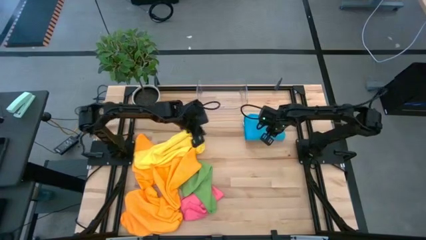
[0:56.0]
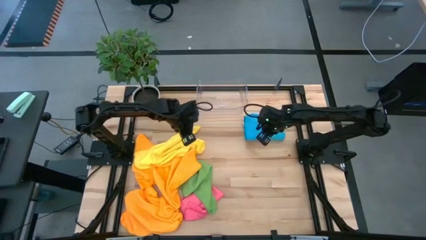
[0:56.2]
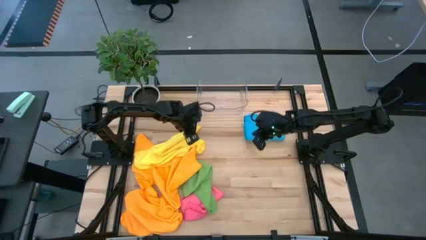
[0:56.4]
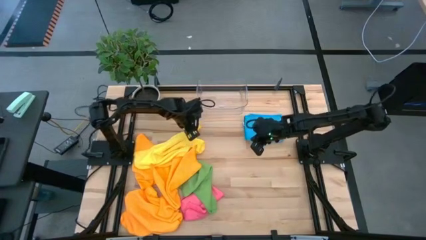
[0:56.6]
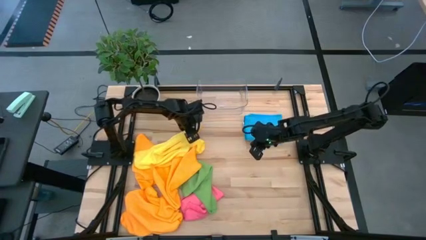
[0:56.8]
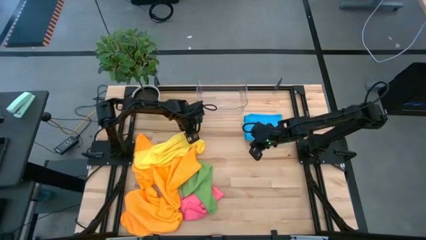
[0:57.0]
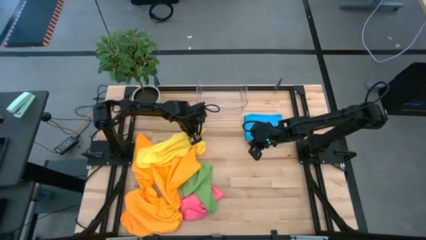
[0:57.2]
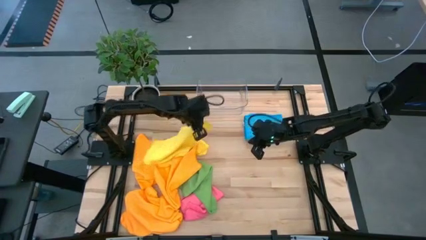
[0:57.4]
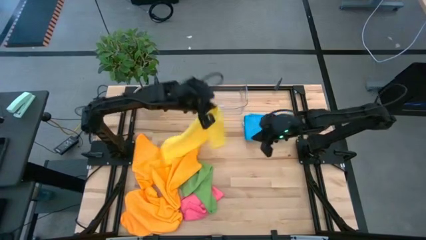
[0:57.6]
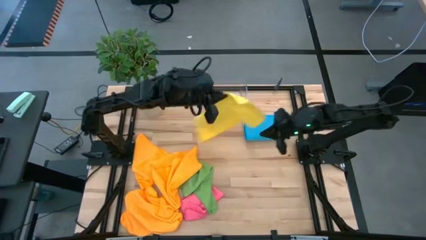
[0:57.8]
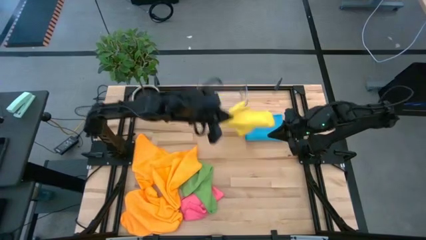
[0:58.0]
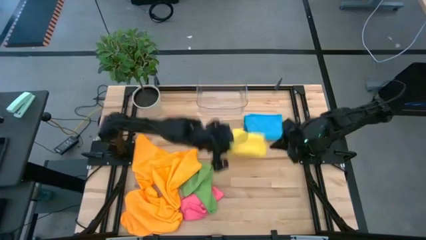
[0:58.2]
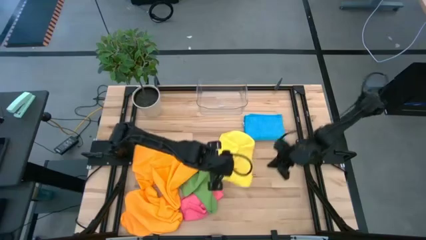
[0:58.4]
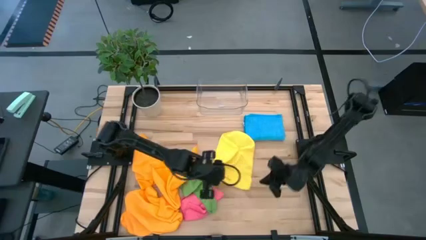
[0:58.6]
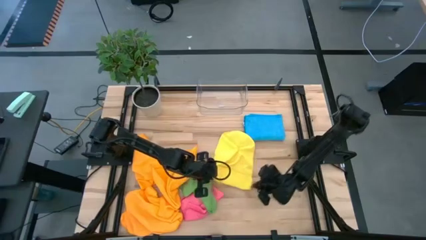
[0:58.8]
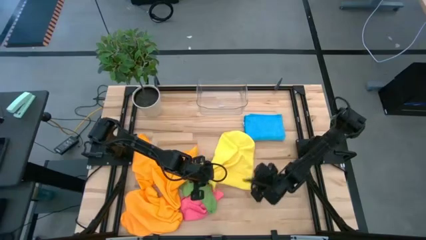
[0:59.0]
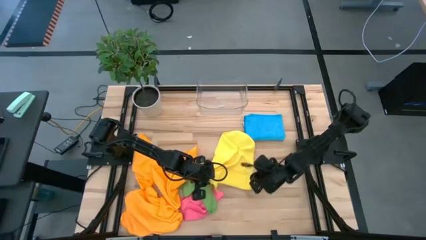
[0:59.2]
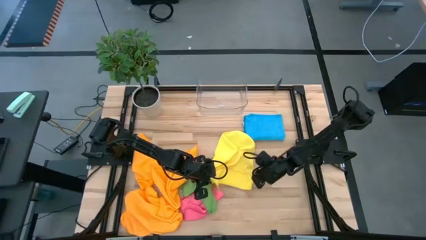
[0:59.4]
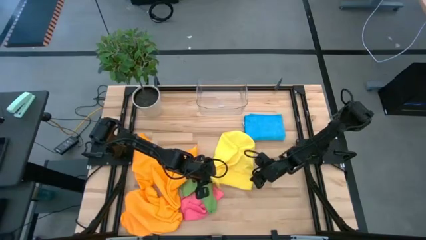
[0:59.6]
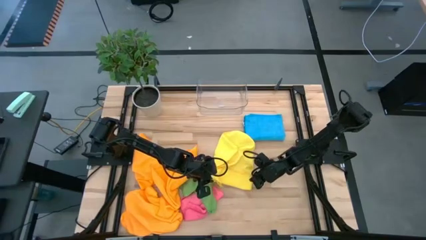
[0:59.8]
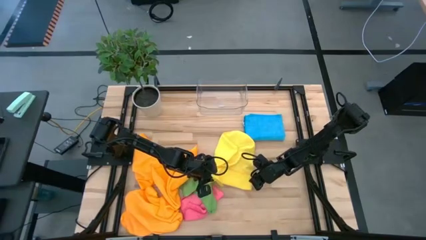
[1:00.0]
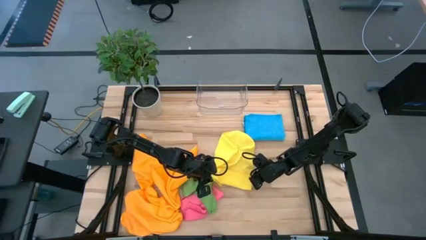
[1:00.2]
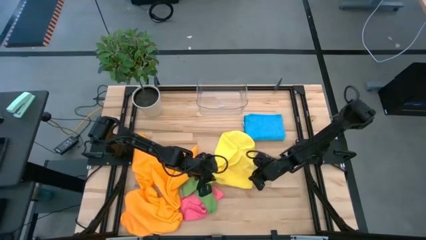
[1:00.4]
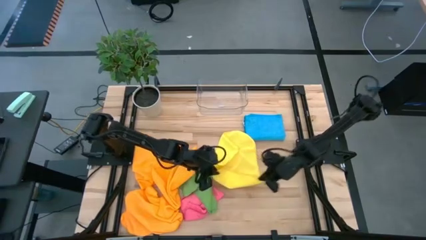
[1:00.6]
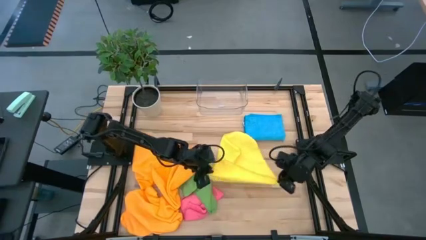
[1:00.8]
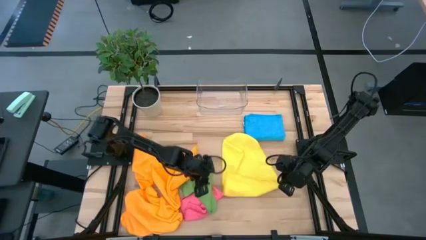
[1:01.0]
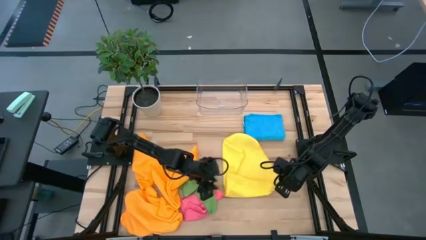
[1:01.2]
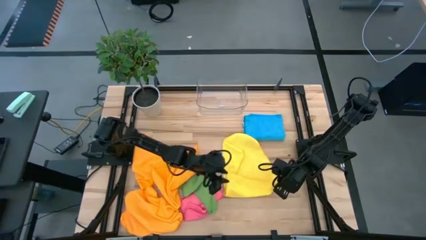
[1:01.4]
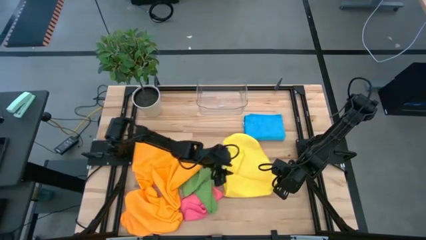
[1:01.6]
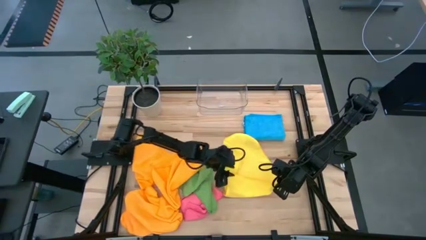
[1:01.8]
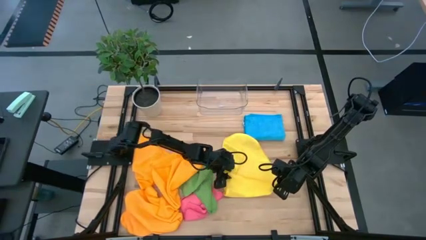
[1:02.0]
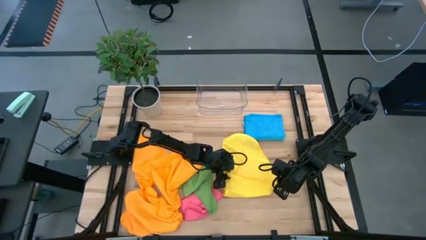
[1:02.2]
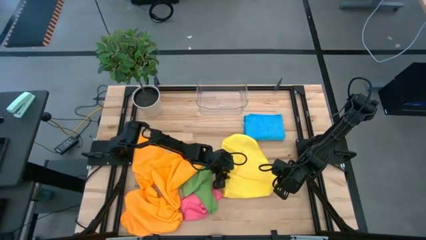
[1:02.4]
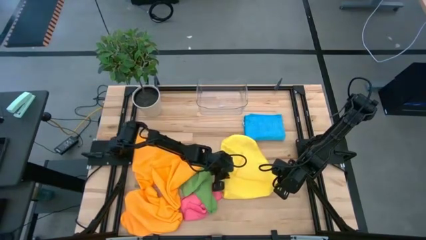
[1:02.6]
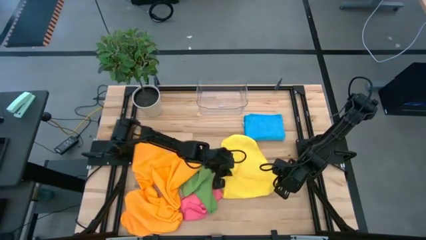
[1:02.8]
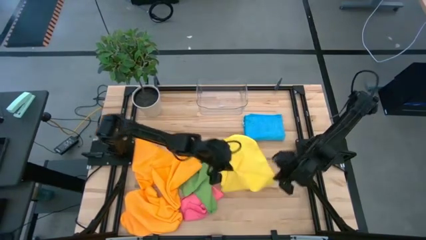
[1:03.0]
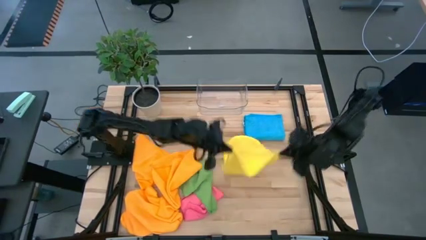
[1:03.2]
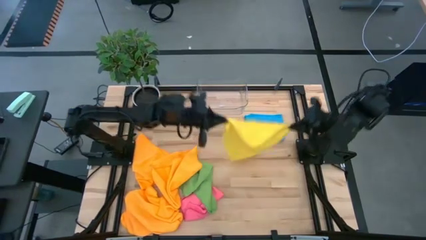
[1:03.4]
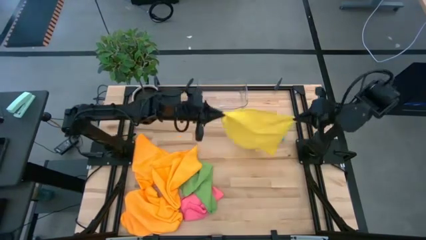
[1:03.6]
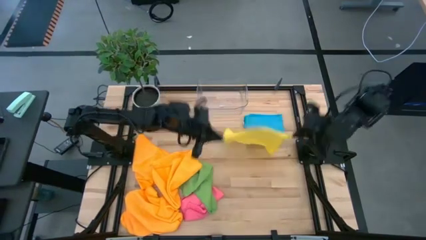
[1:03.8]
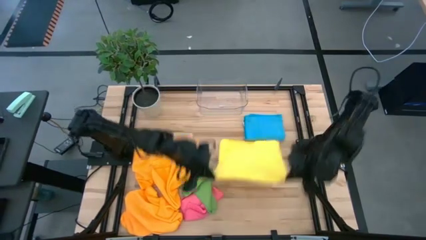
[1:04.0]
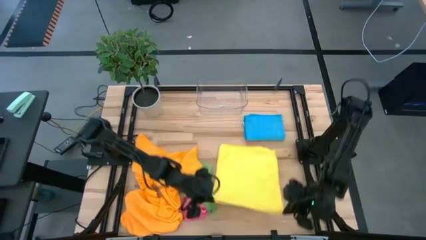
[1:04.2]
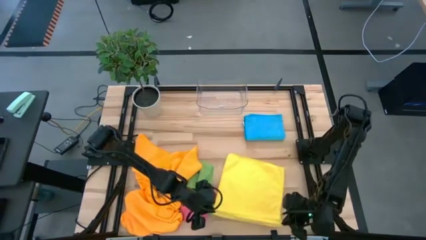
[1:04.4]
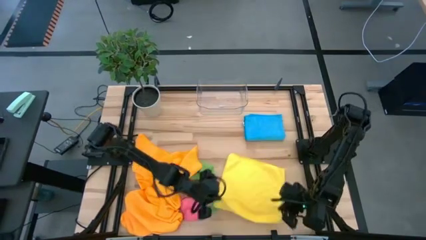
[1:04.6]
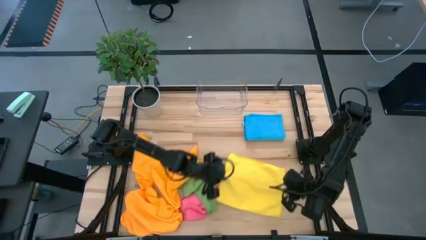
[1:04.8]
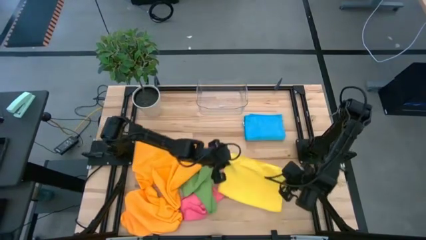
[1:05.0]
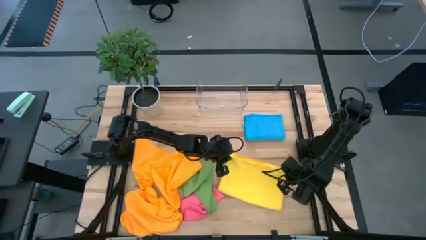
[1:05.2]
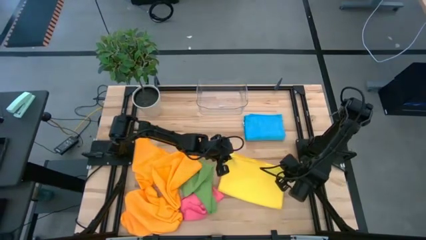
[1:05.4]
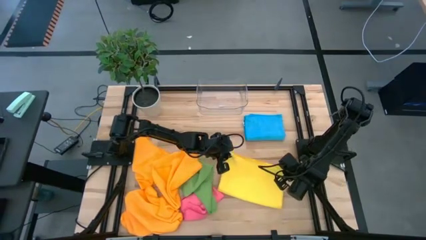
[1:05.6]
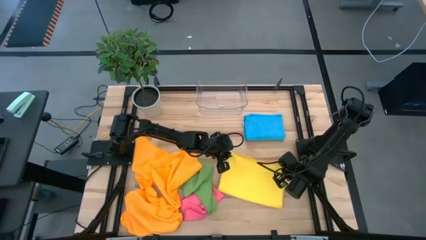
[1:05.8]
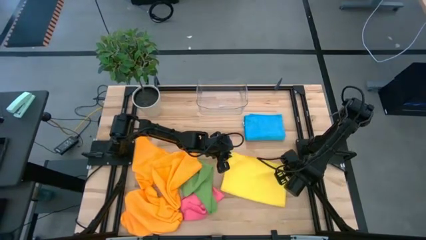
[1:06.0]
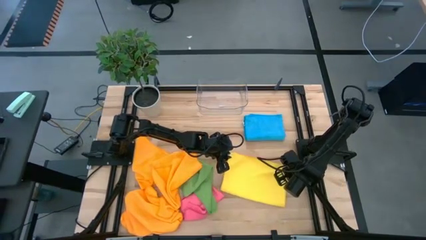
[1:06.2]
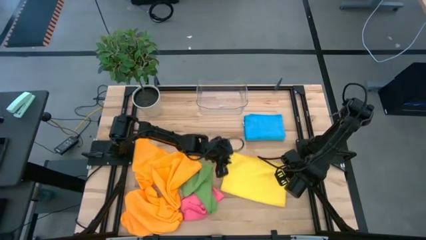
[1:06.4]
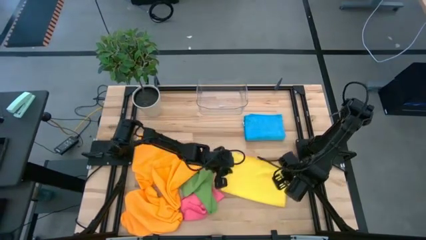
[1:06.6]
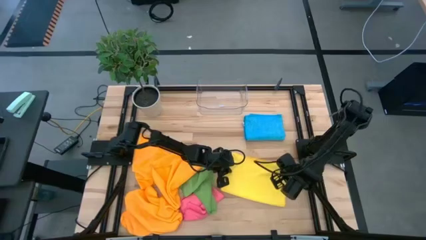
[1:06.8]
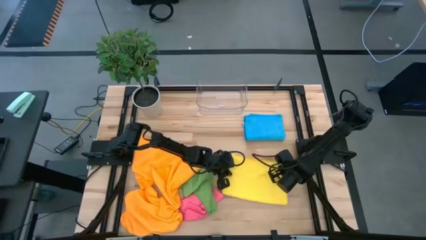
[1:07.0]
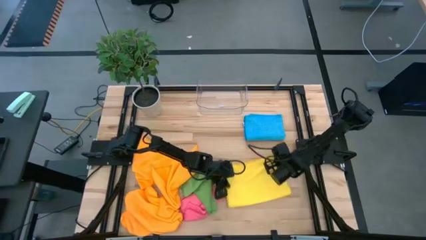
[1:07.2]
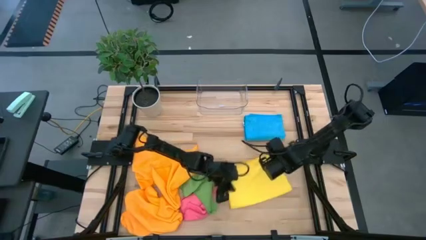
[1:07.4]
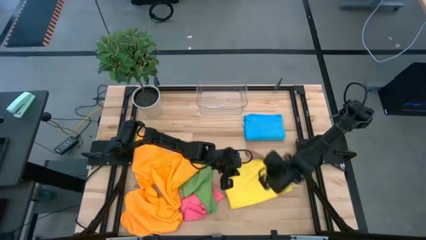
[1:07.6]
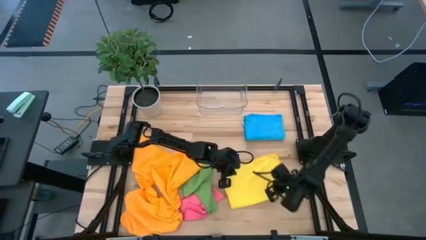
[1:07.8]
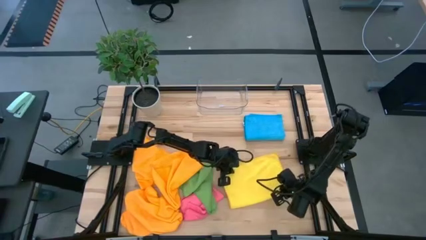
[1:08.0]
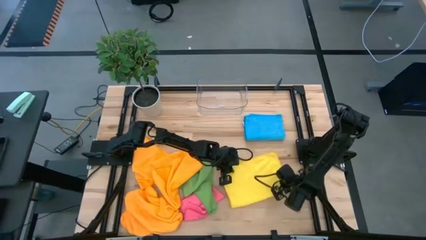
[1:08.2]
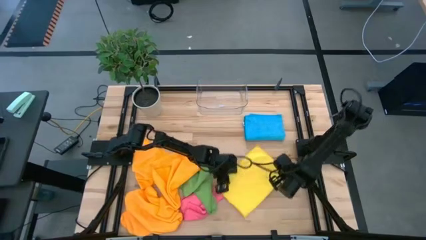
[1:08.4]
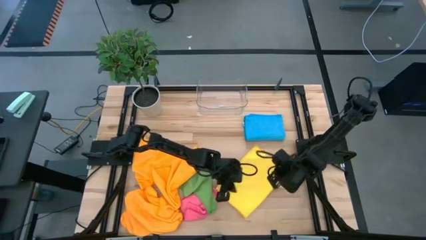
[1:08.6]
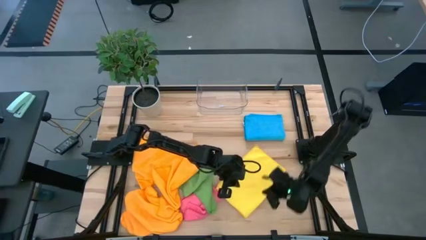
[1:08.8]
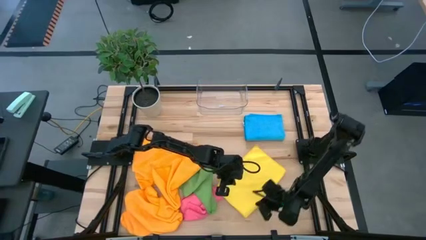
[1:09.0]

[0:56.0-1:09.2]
Task: Fold microfiber towels
Fold the yellow towel

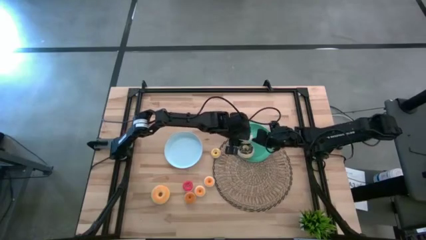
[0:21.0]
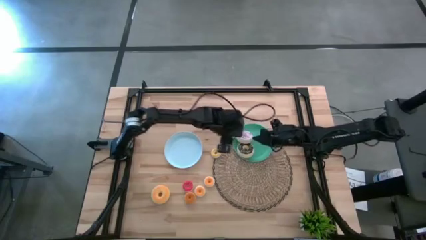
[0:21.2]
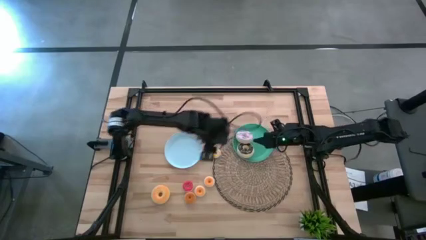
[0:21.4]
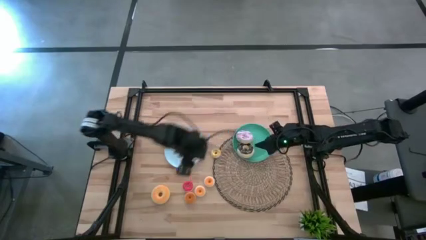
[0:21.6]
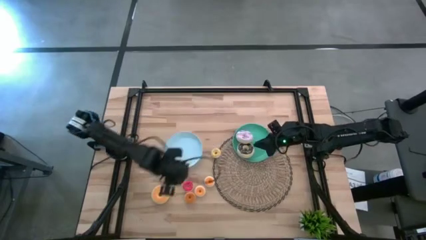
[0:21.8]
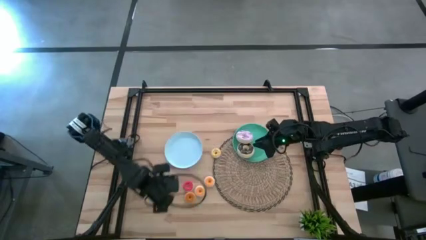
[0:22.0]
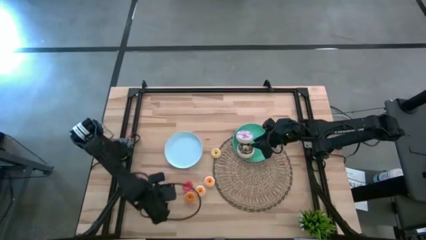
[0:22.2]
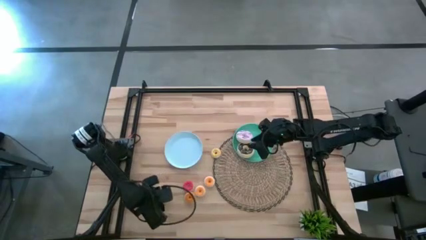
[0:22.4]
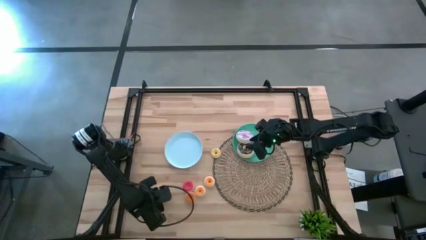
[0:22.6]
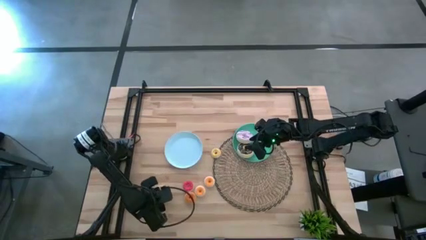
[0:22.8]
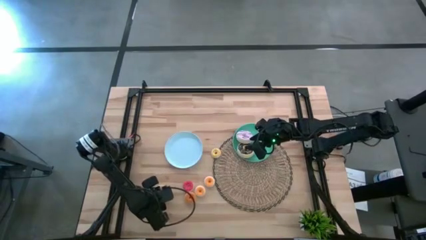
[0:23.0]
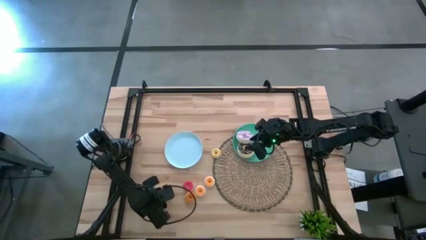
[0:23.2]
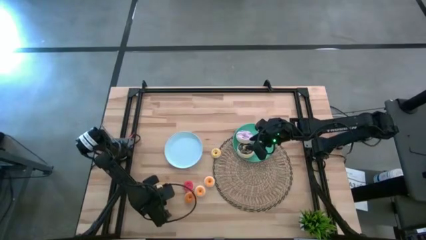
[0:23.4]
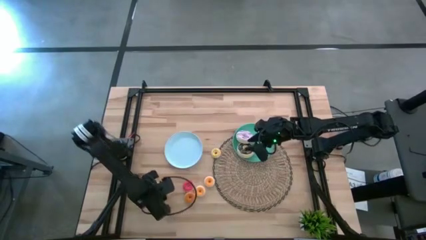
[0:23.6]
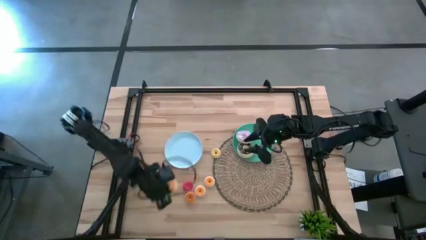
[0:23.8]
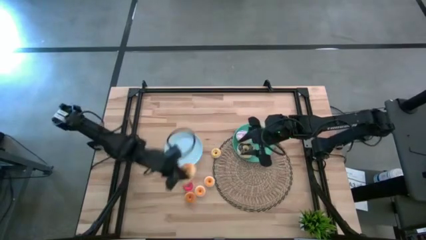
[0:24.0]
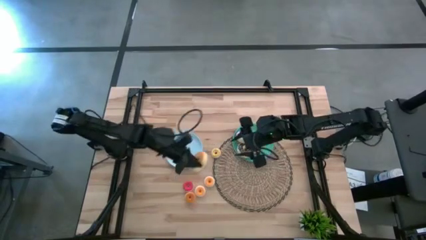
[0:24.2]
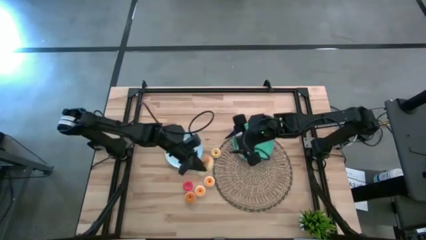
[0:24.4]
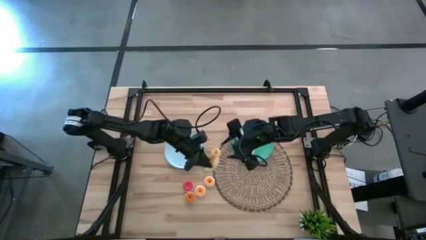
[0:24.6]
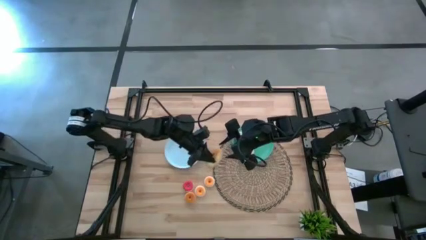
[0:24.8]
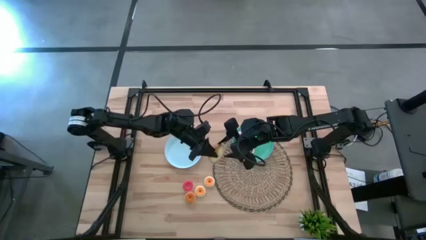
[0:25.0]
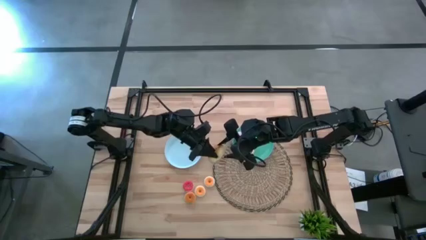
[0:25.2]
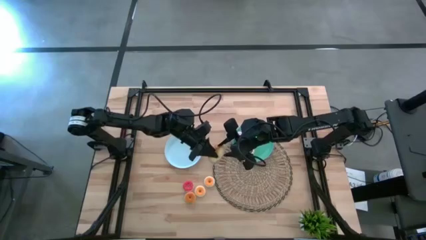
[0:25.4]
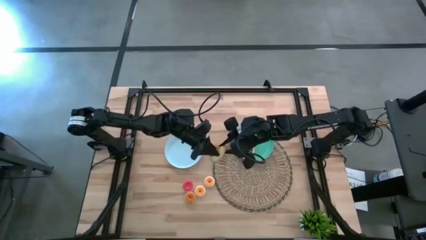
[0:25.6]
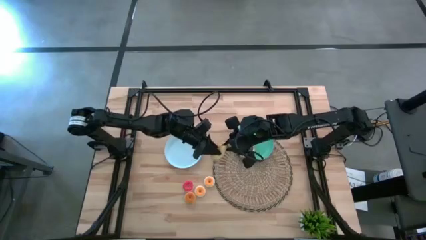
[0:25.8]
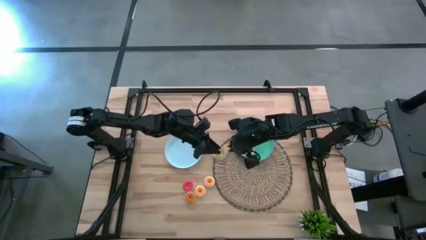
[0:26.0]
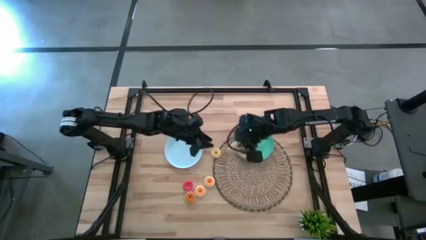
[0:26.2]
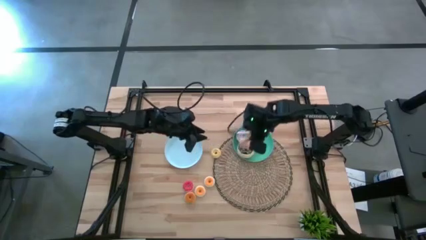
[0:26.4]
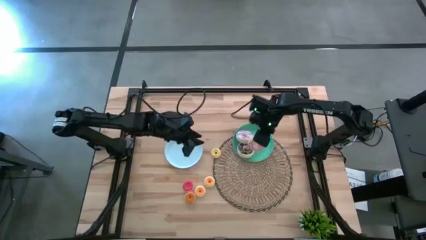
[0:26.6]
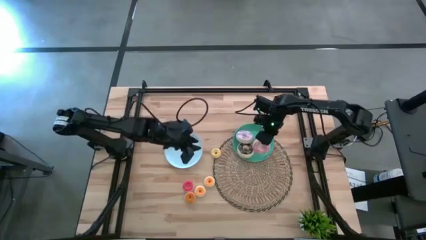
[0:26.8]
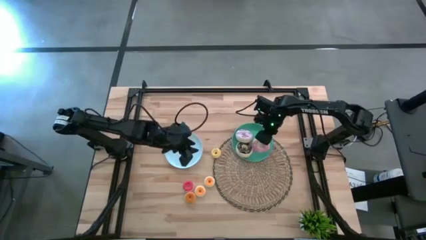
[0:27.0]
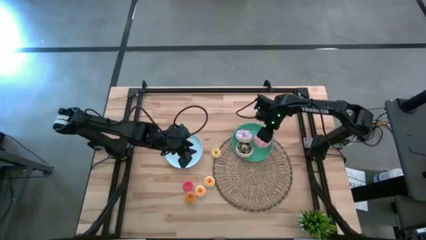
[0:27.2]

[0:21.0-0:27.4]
Task: Pick & Place donuts
Put the pink doughnut on the green plate
